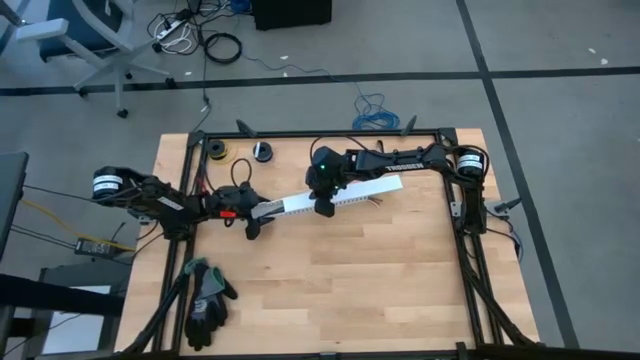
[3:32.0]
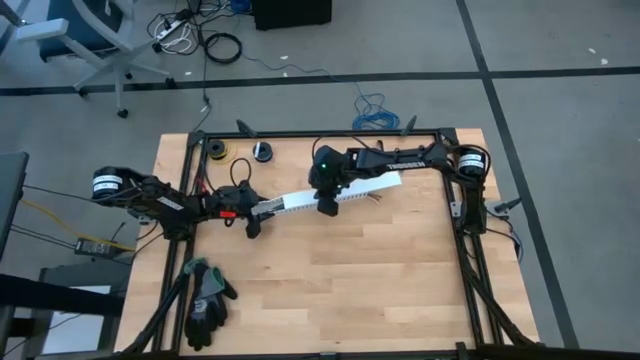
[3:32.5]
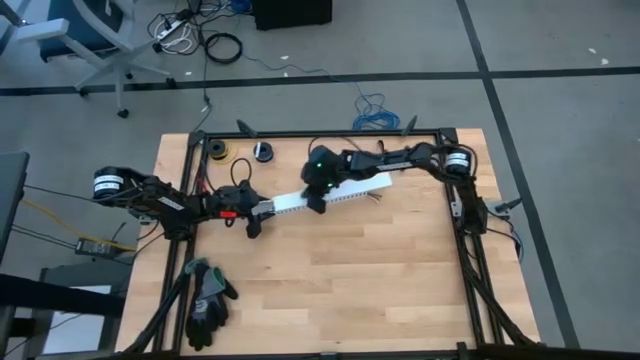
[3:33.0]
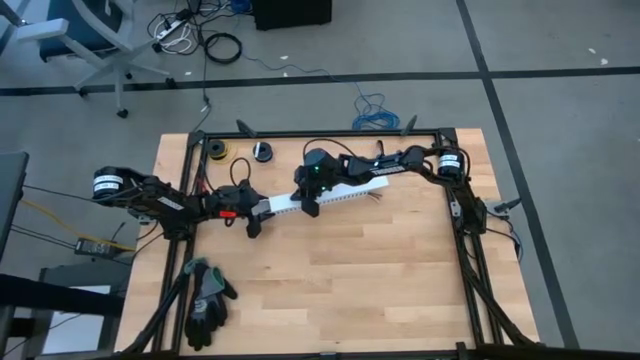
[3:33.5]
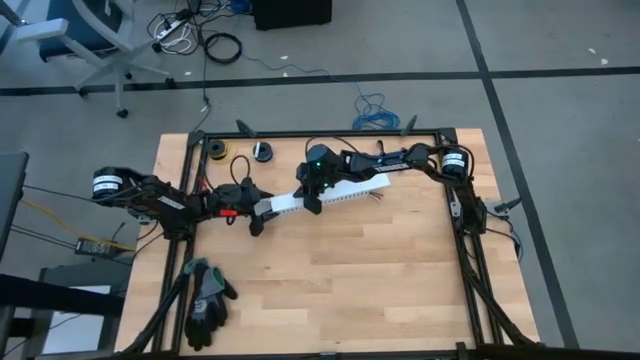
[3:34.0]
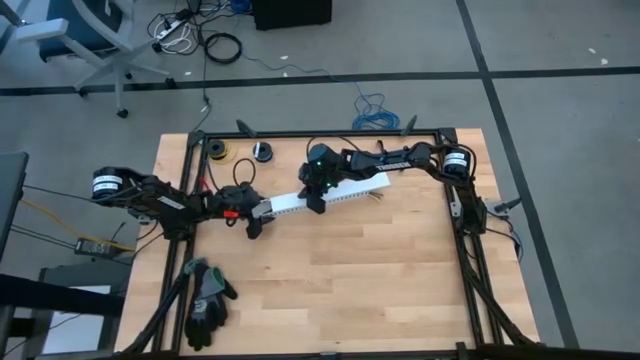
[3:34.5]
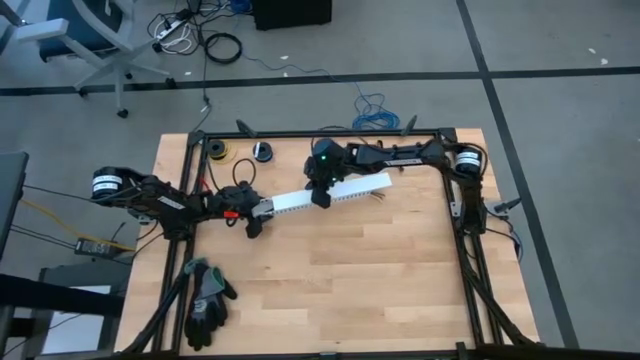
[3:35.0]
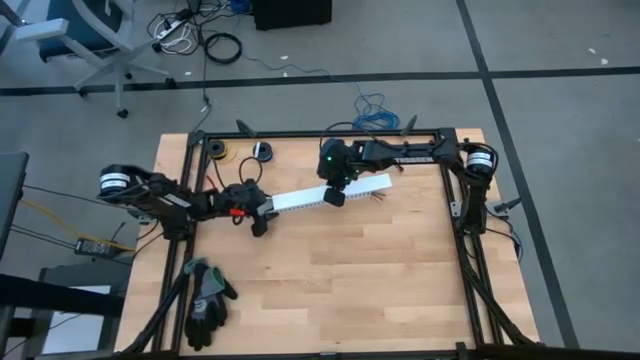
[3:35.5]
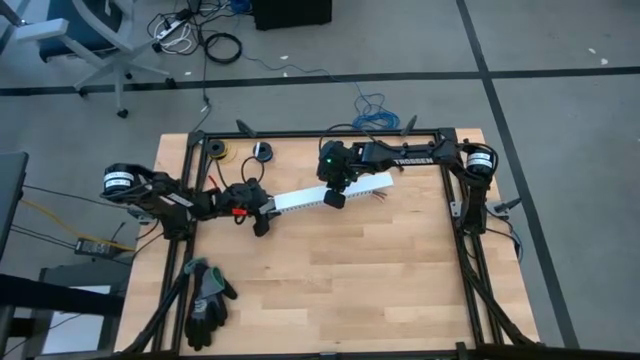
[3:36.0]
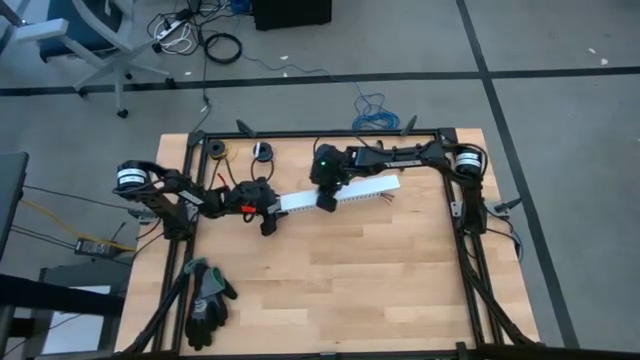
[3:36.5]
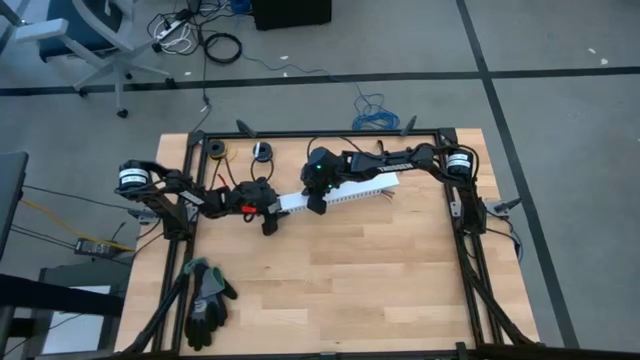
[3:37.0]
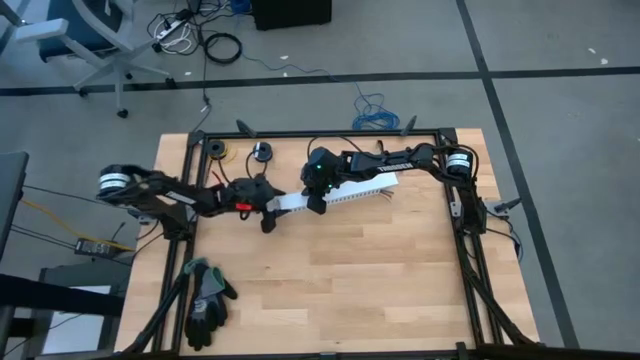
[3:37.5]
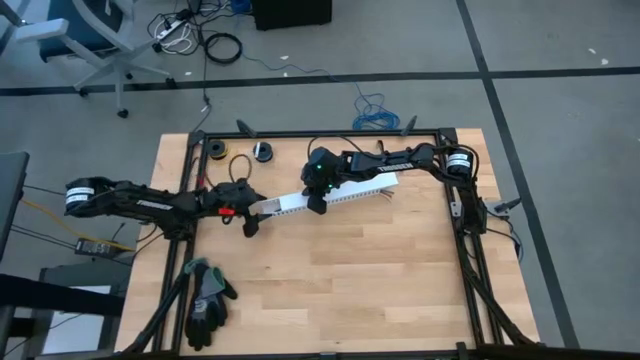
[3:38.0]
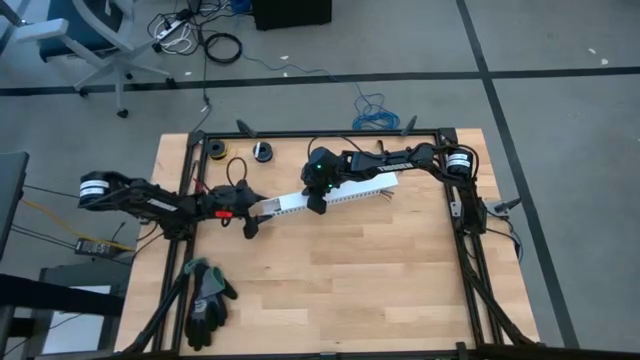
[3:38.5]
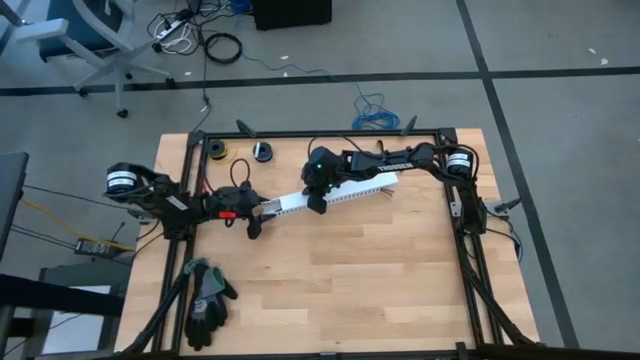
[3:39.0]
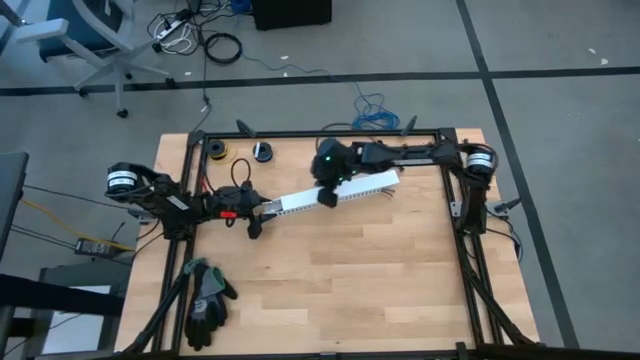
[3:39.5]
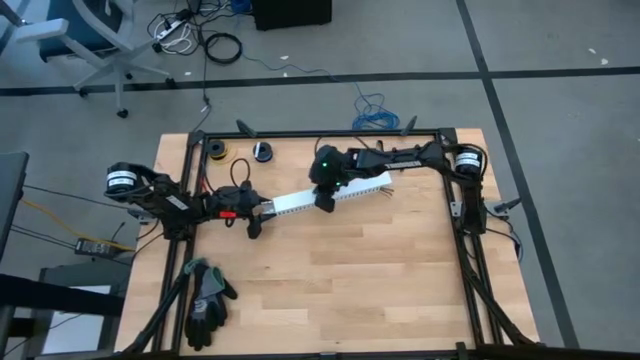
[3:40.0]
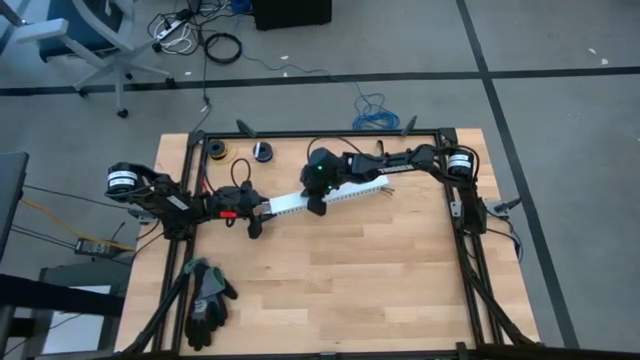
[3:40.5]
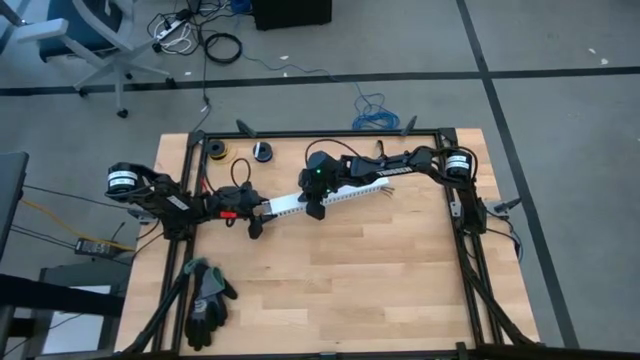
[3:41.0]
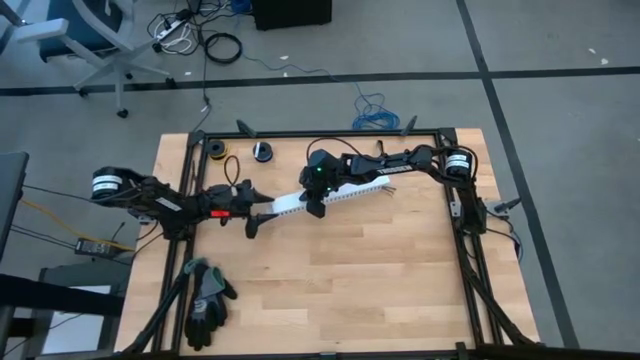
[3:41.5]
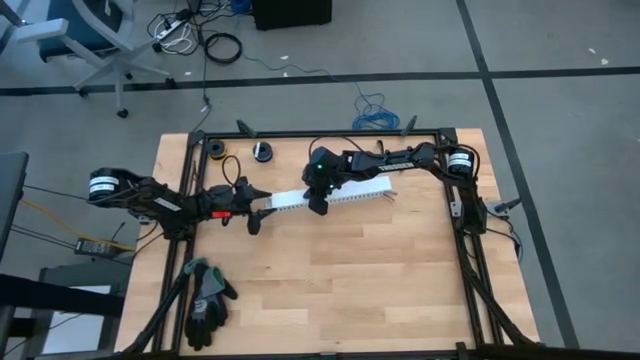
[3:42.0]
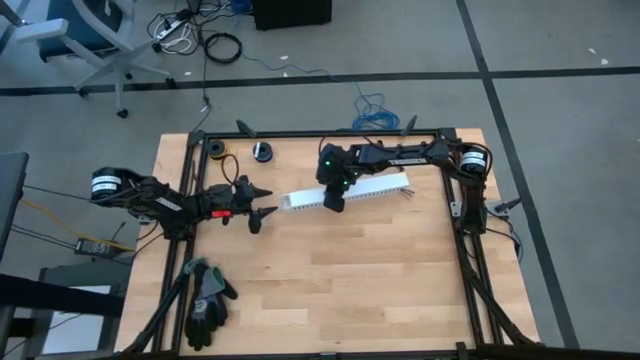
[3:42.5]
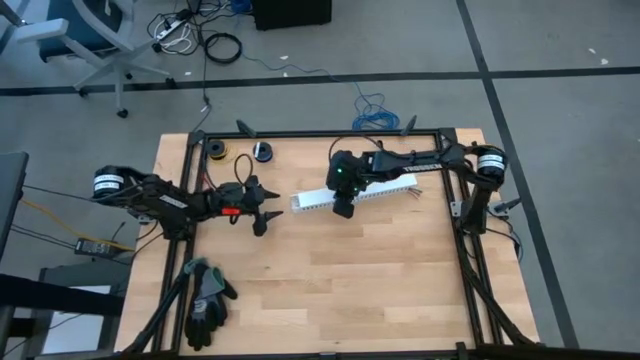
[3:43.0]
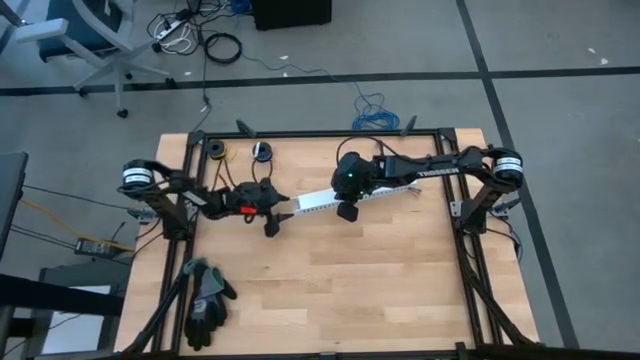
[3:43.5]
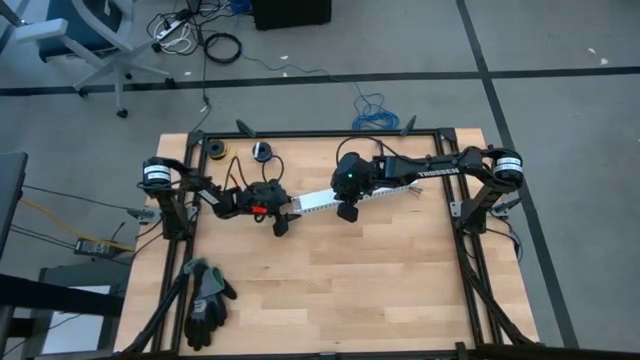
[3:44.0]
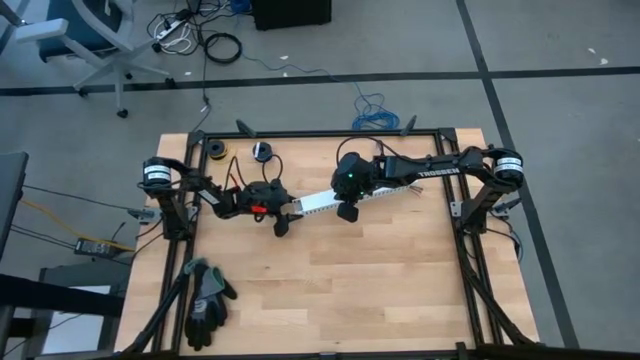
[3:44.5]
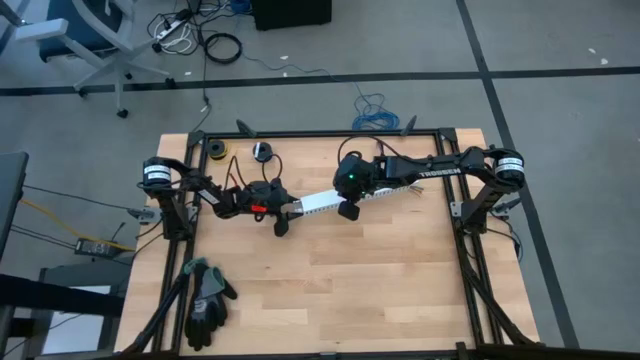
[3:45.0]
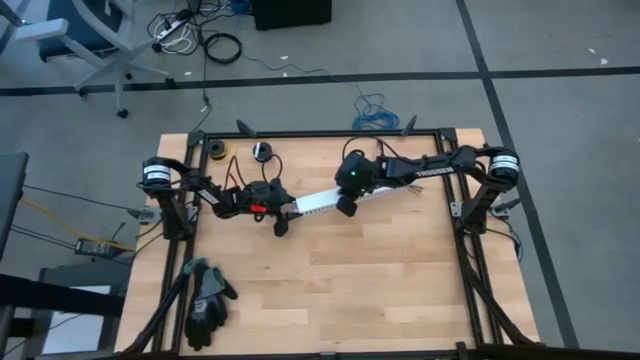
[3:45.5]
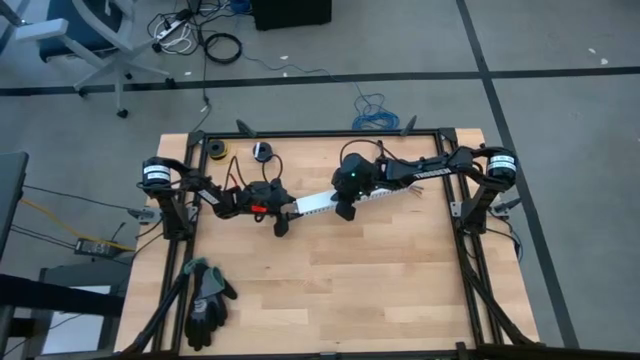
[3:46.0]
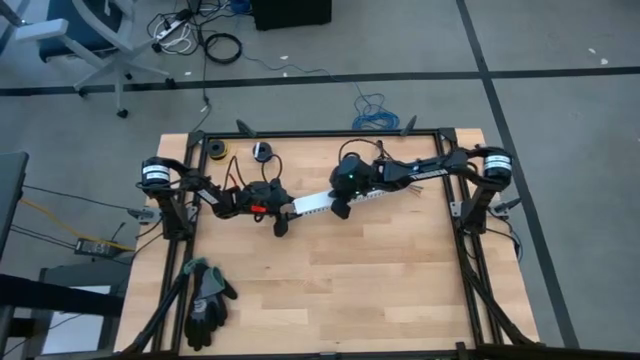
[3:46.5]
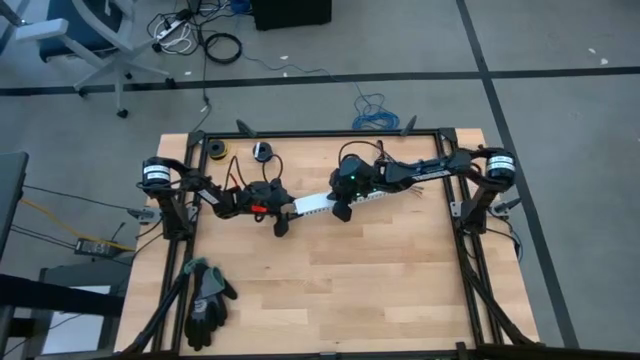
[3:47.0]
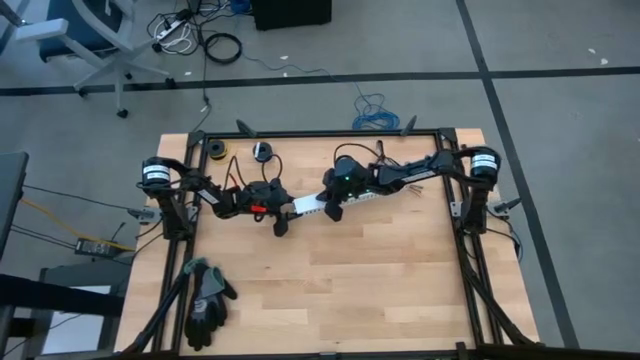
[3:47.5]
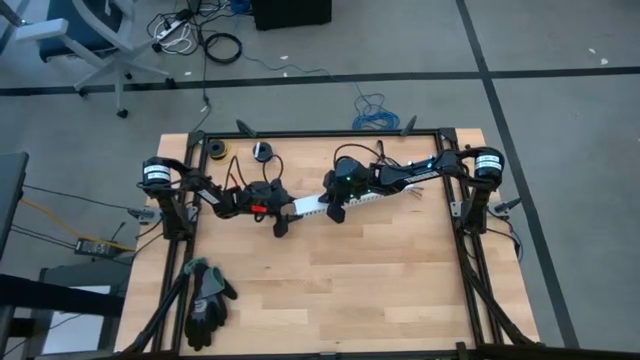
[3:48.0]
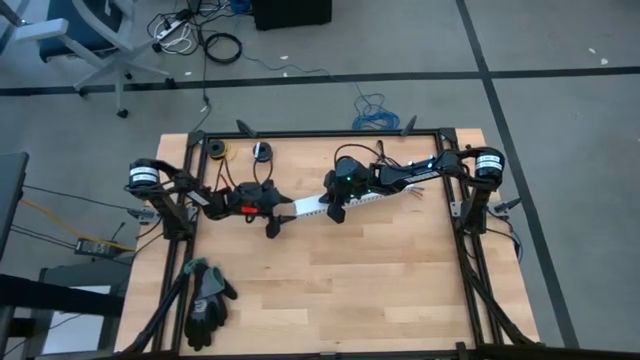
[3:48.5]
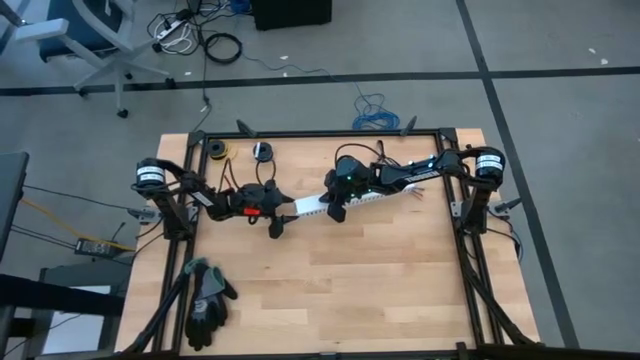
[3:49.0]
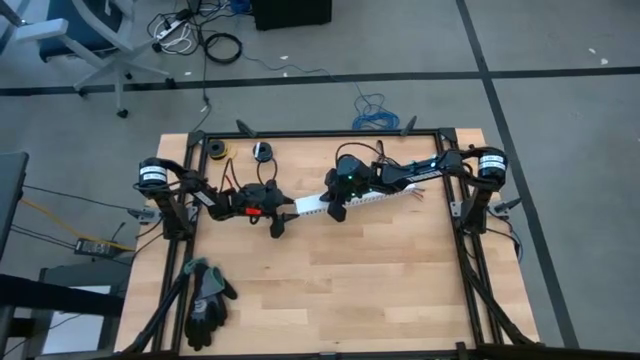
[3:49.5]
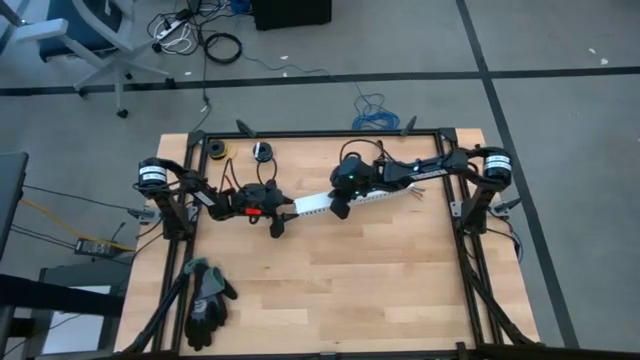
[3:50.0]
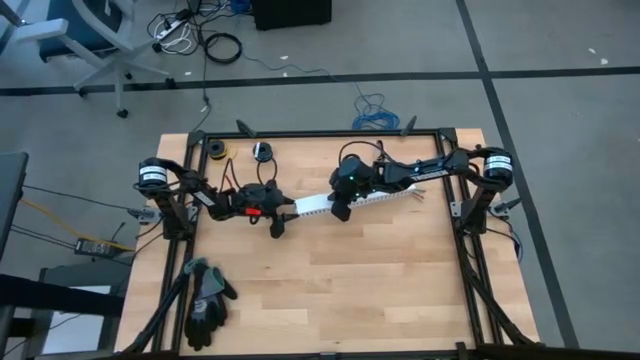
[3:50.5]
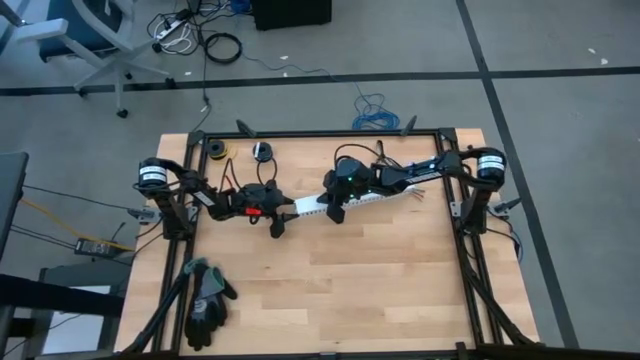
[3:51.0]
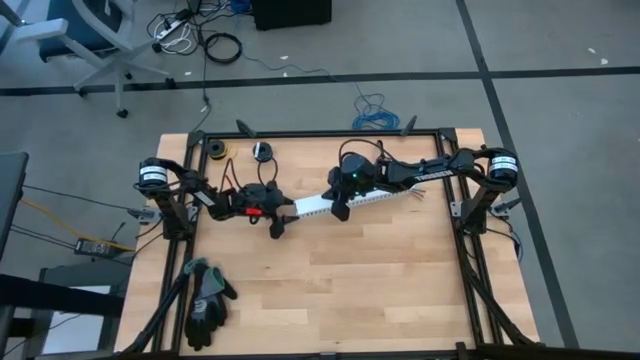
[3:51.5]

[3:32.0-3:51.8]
Task: Ziptie cables
Close the cable duct

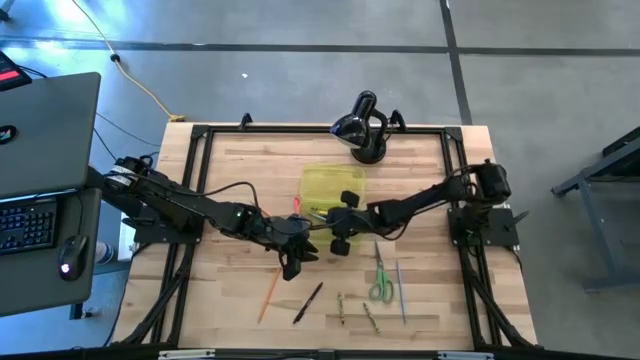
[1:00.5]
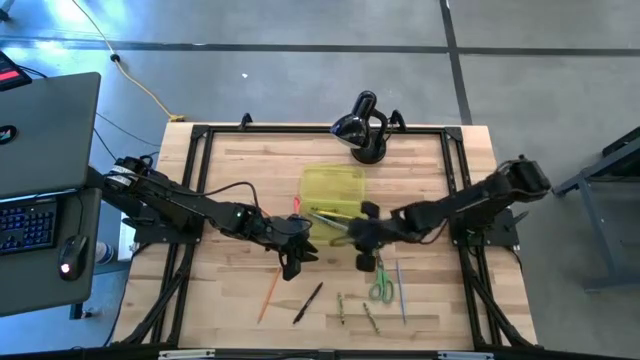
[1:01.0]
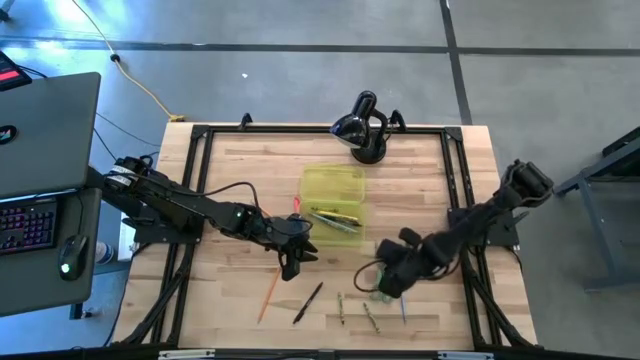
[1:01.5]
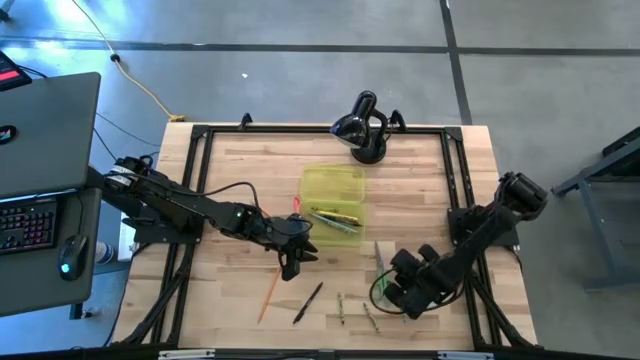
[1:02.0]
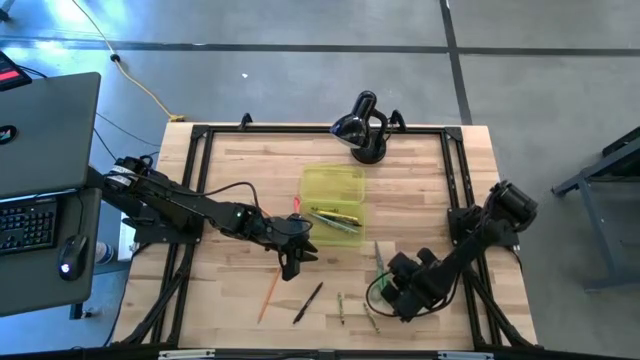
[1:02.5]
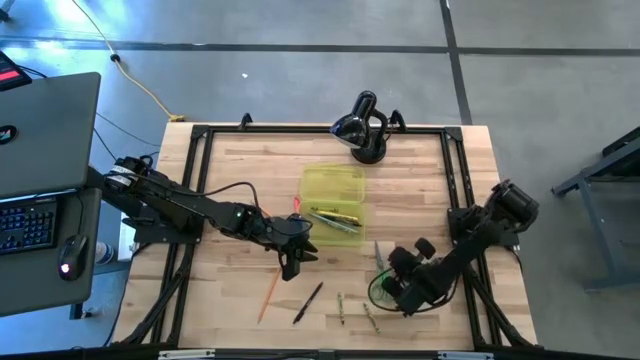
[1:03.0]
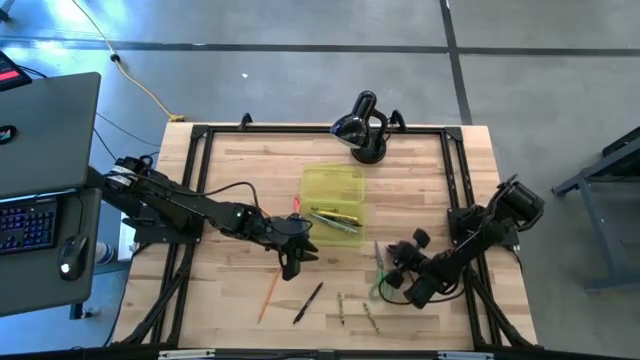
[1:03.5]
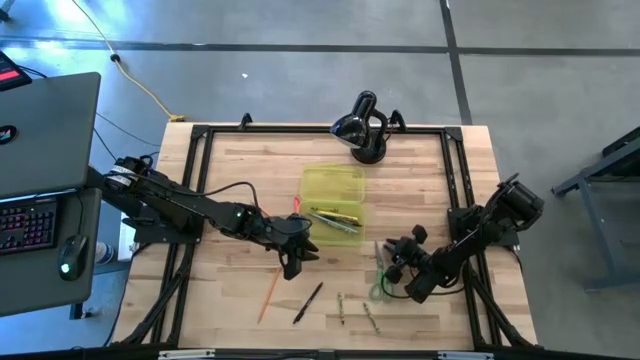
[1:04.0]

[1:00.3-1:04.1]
Task: Pick & place school supplies into a supply box
Put the blue pencil into the yellow school supply box
